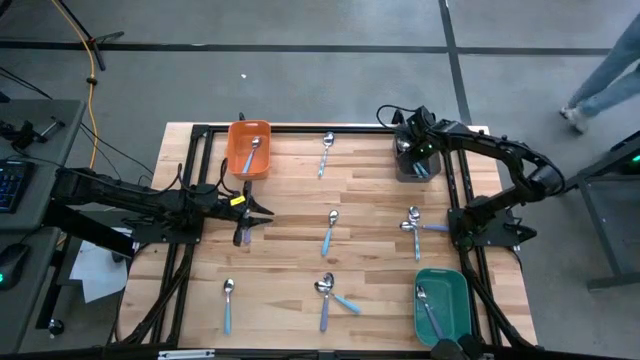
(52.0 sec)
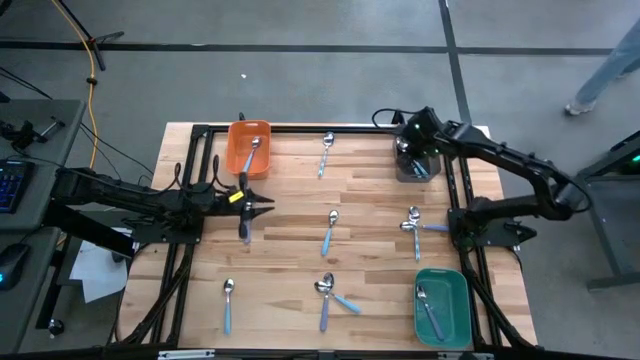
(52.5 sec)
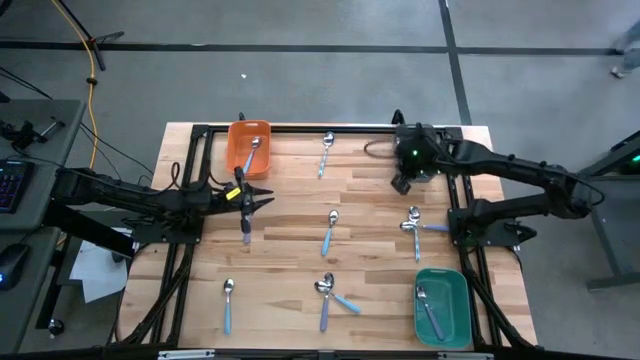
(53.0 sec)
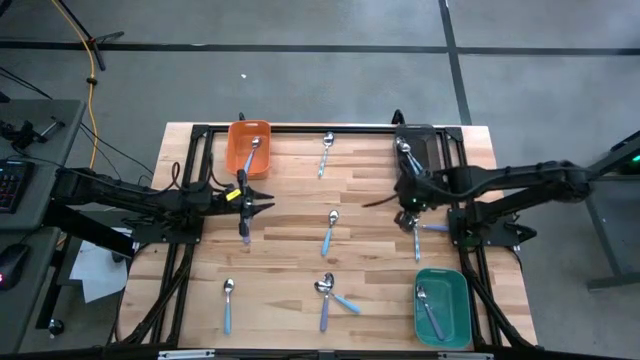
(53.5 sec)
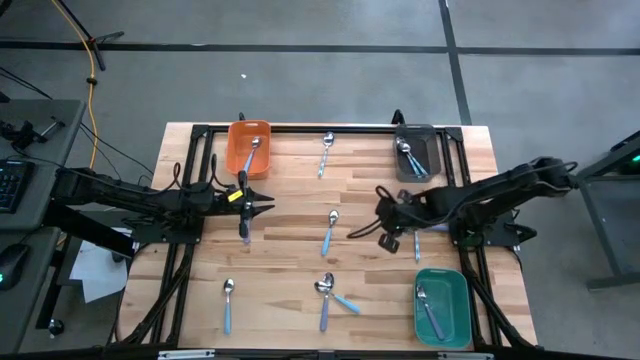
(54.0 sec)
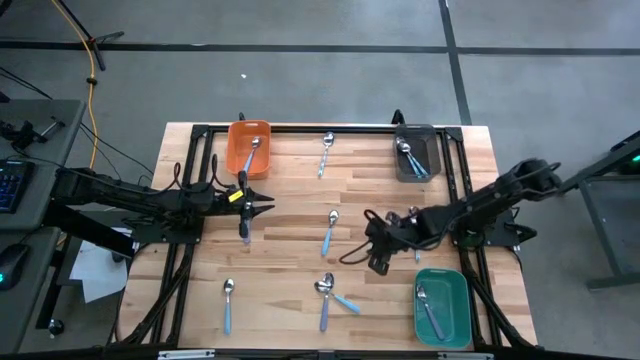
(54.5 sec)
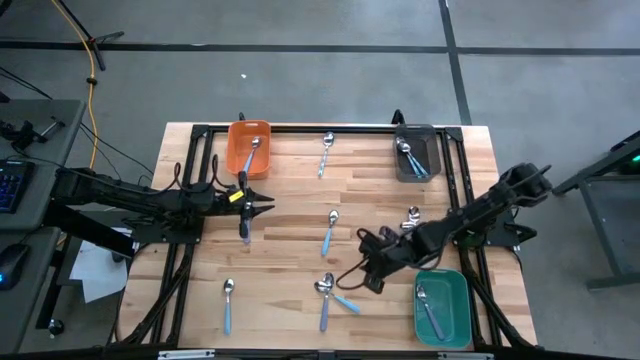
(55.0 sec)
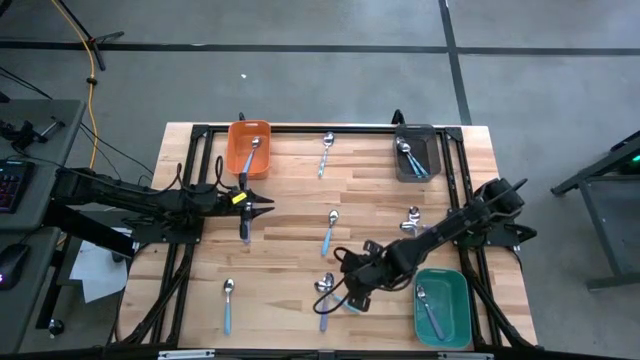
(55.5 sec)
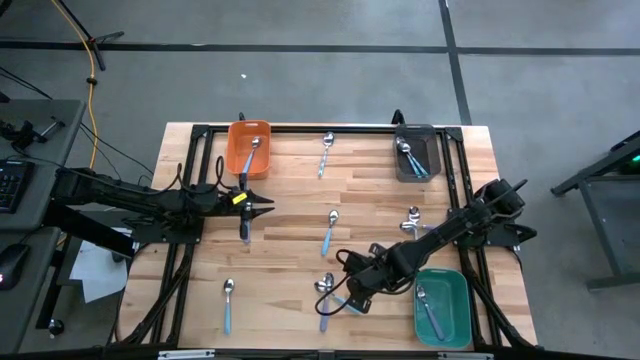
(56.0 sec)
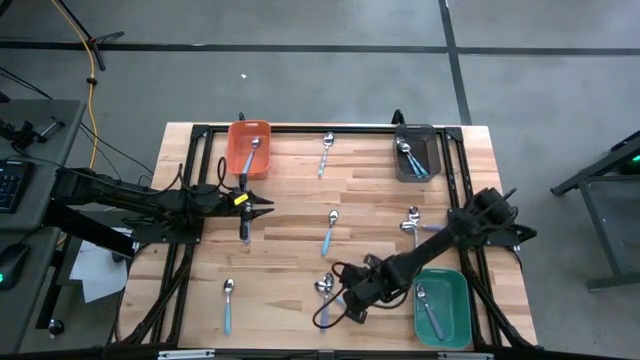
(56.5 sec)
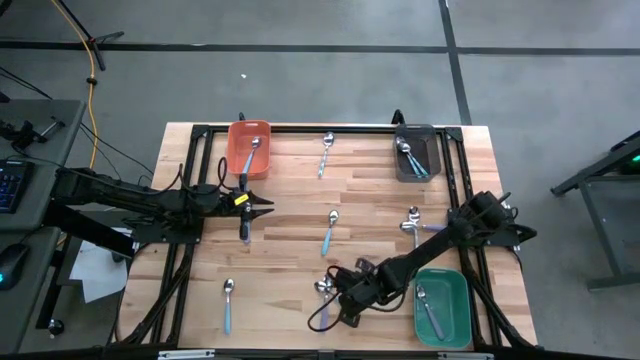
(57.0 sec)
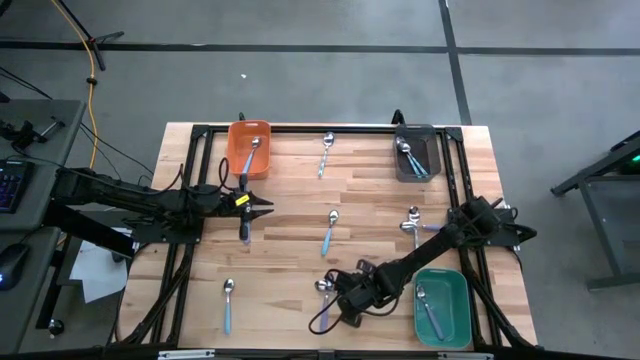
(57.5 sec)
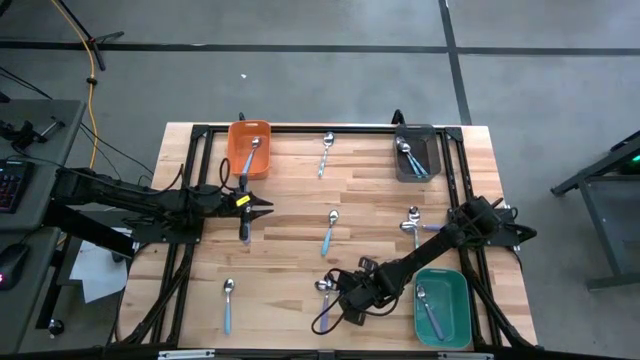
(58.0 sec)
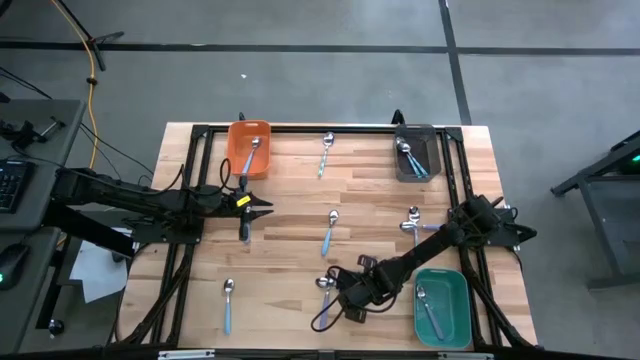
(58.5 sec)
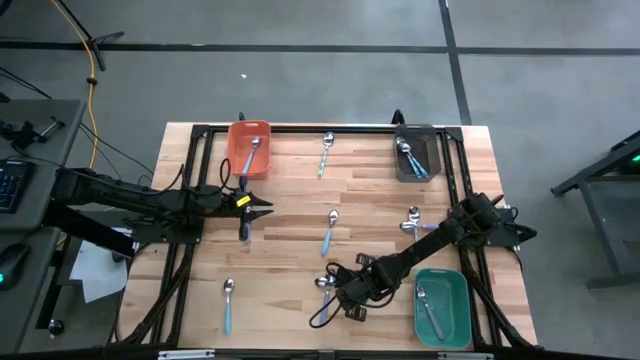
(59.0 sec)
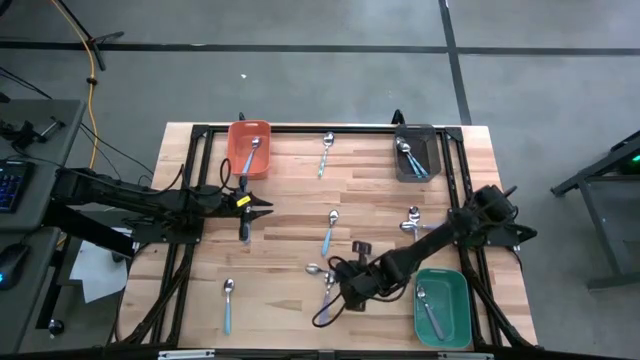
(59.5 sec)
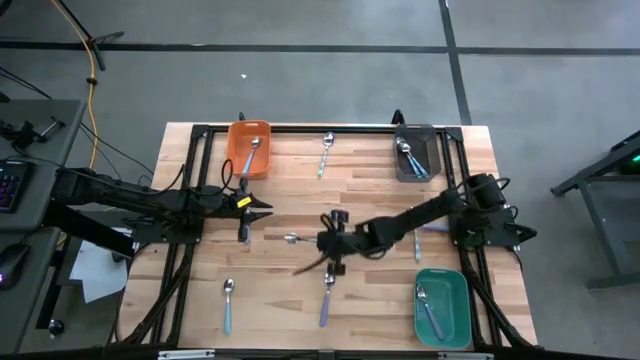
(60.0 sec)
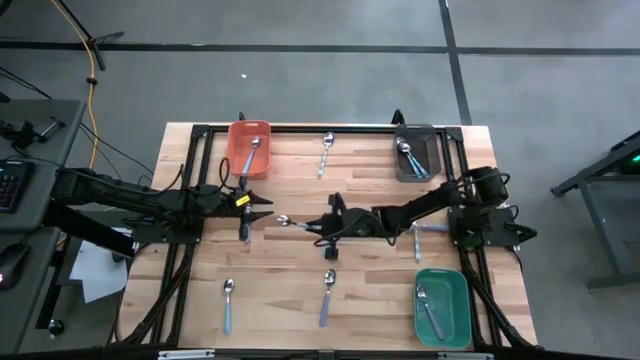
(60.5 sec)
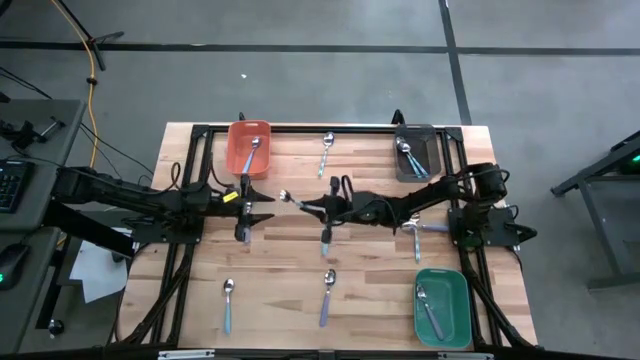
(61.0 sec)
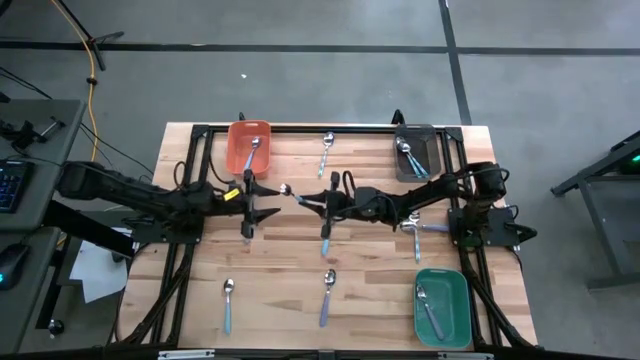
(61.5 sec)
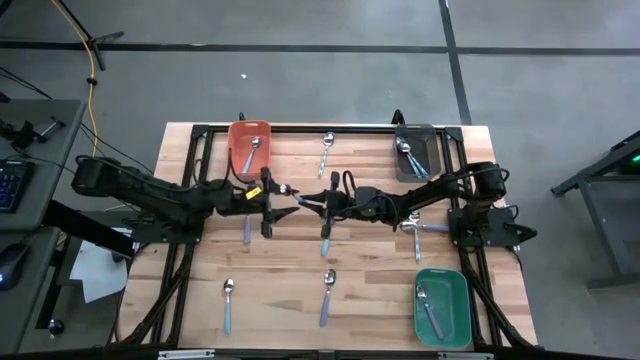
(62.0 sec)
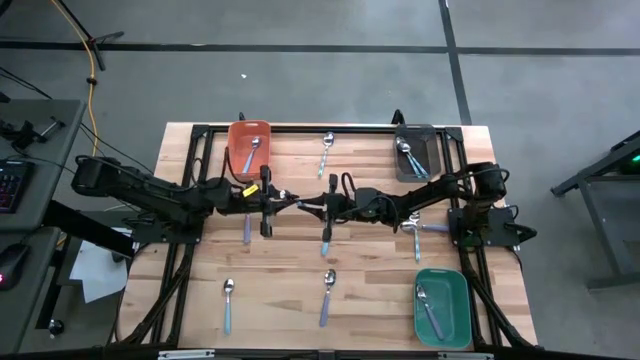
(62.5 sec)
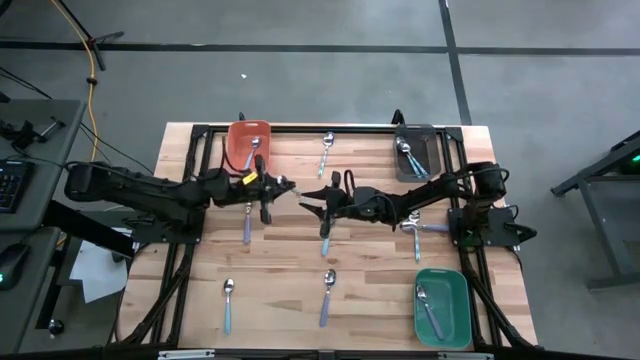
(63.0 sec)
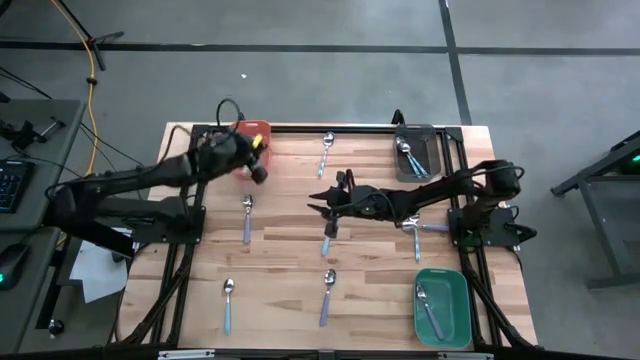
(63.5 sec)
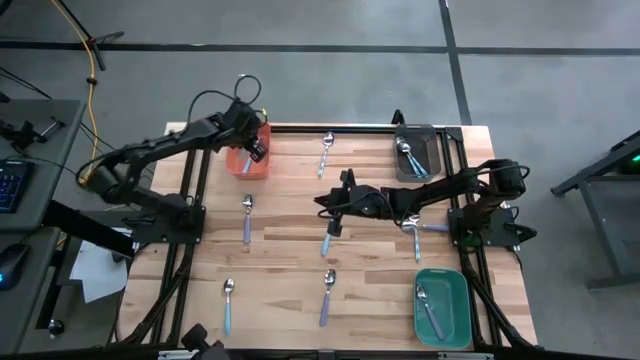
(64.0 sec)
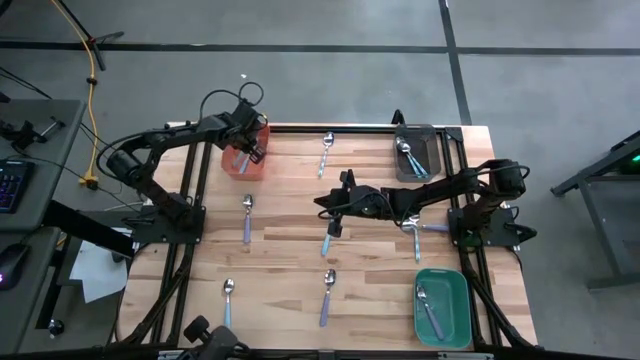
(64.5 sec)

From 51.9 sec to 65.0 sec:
Task: Sort silverware by color (type)
Put the blue spoon into the orange bin

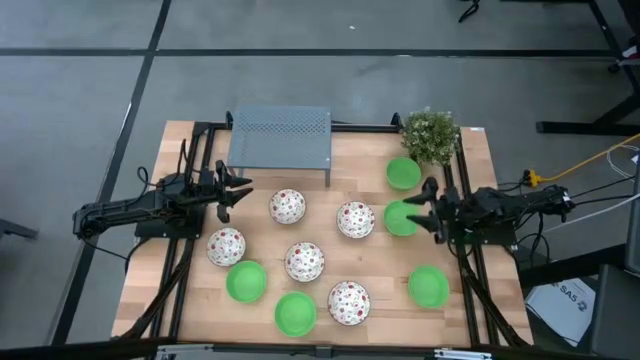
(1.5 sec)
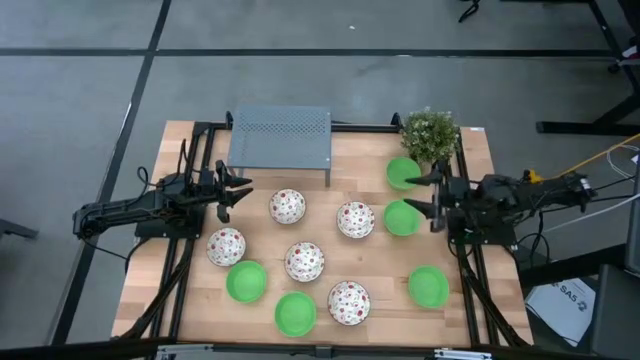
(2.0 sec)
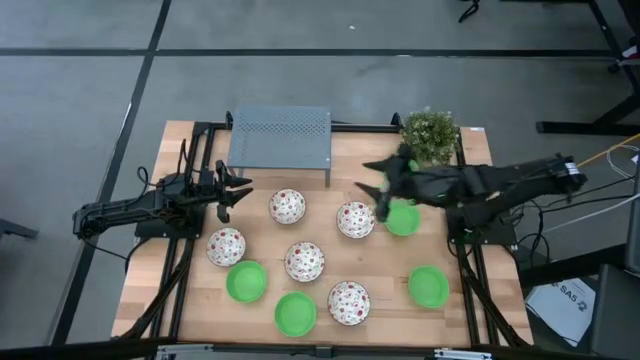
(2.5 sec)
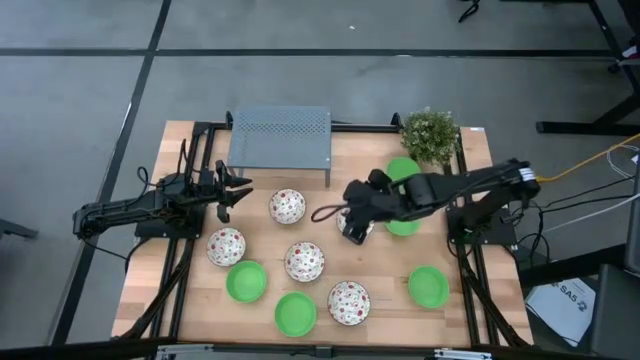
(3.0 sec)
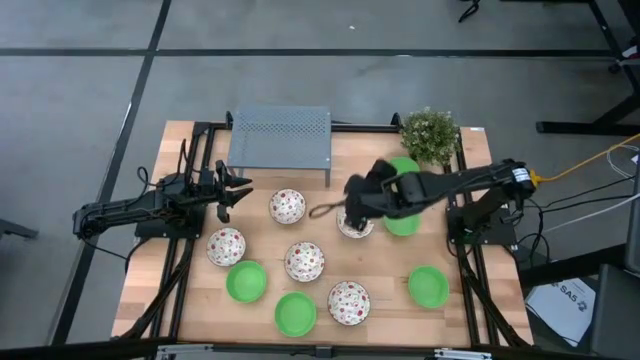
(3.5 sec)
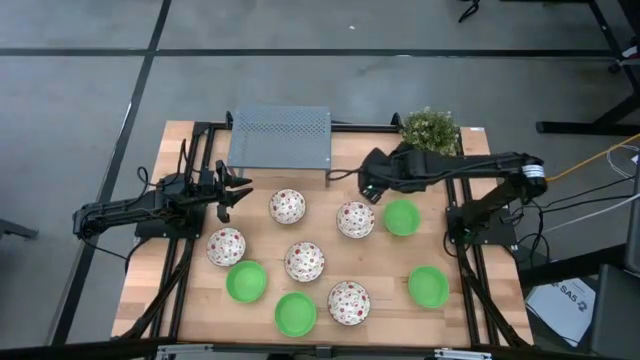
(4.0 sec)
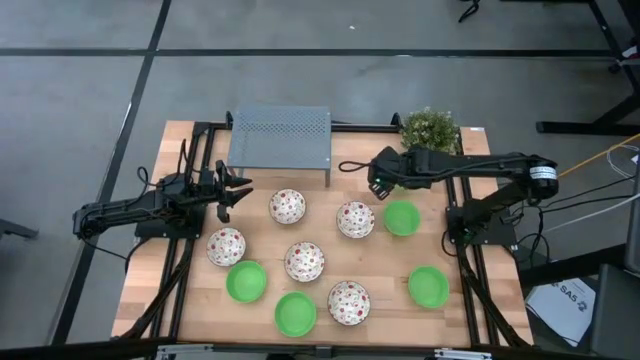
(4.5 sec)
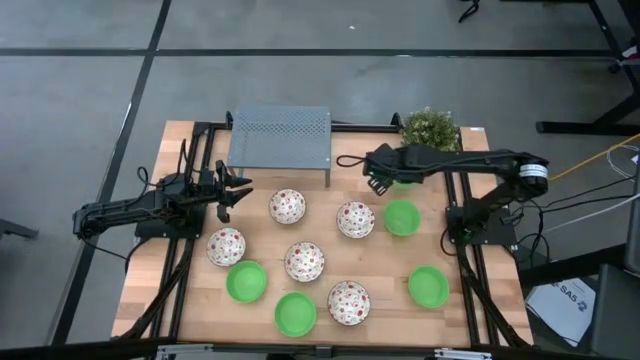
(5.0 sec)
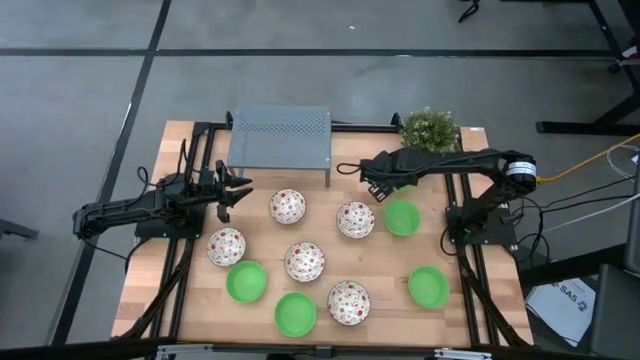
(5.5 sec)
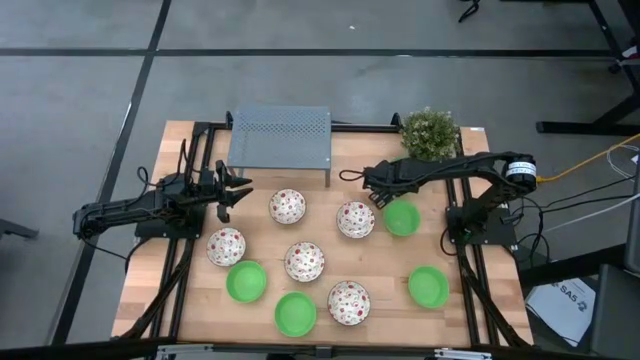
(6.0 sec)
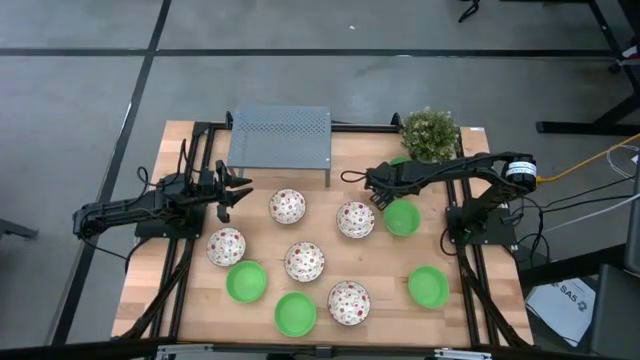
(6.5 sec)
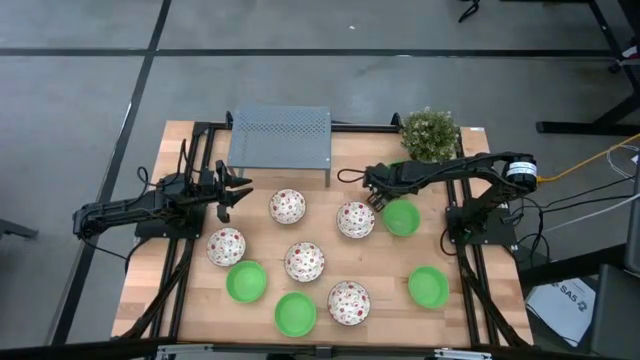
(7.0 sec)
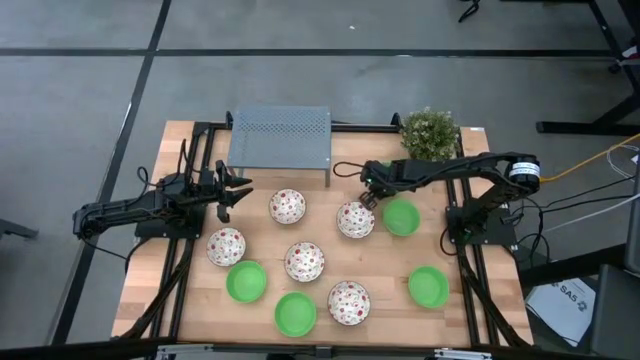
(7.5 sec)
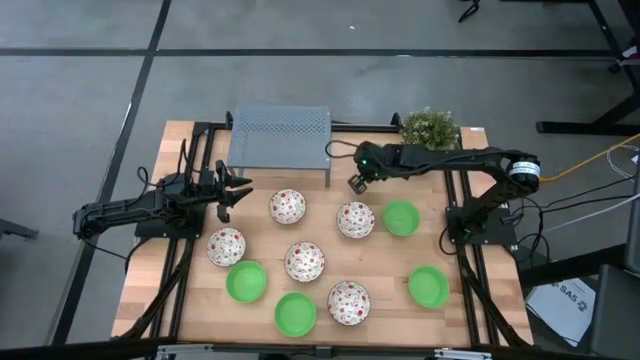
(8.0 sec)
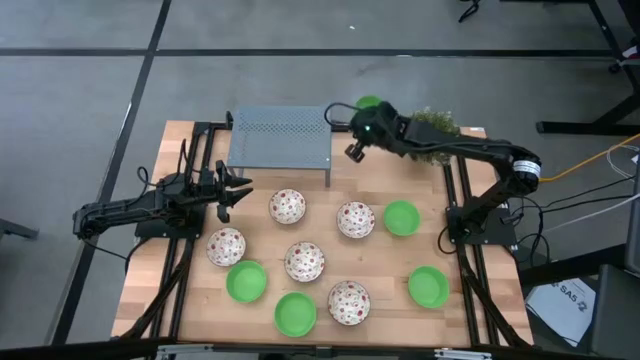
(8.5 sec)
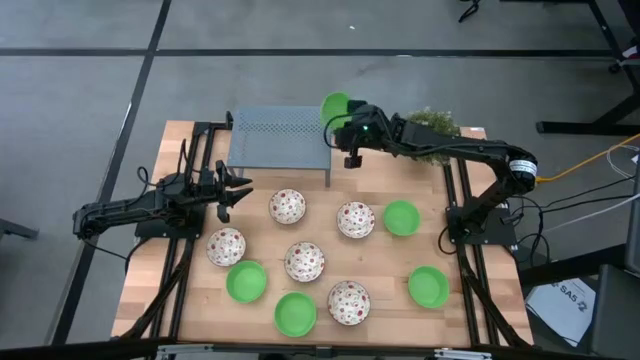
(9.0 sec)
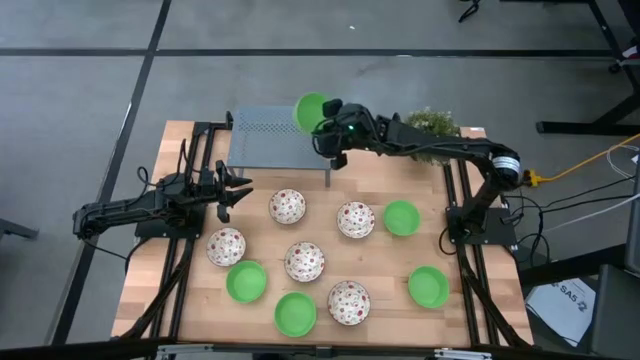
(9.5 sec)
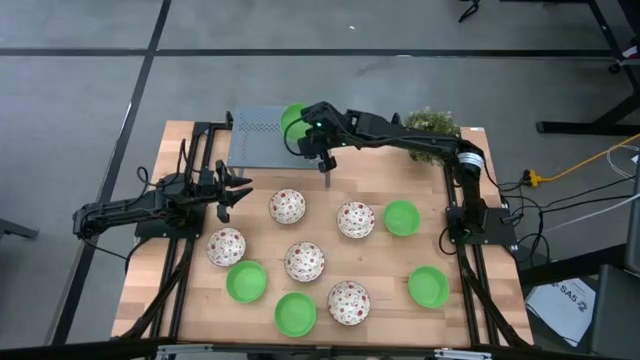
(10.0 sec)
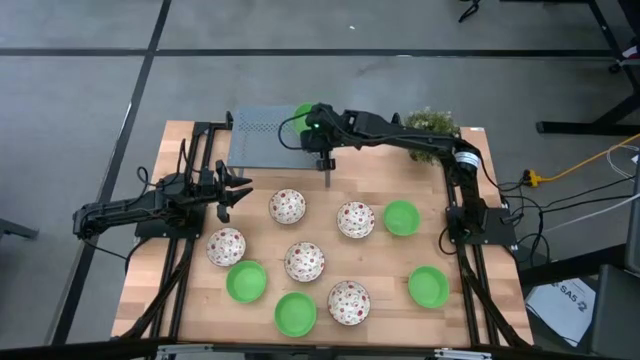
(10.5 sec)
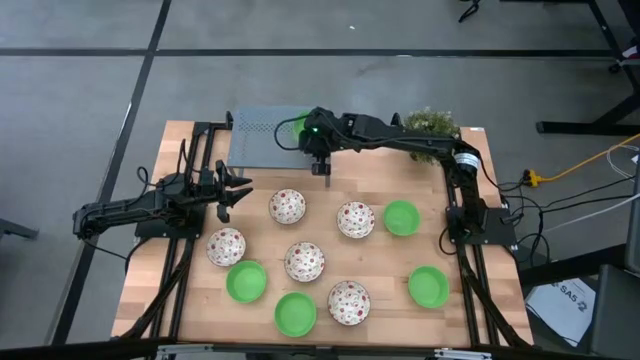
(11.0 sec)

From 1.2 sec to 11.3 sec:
Task: Pick & Place Mini bowls
Put the green bowl on the shelf
